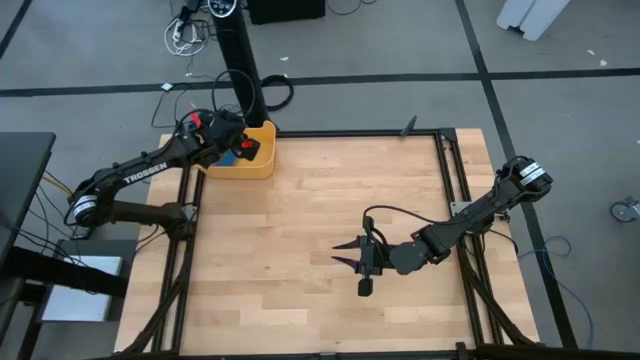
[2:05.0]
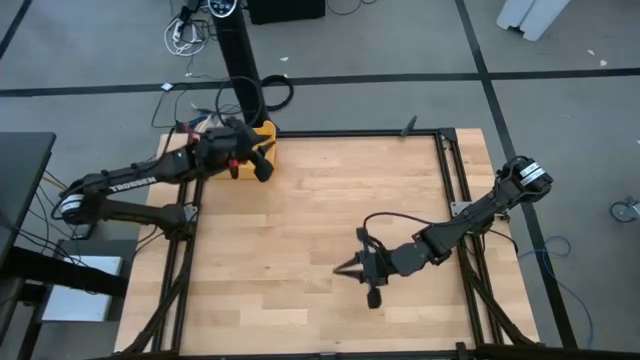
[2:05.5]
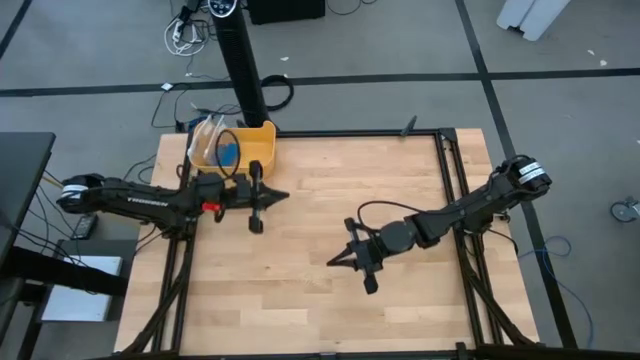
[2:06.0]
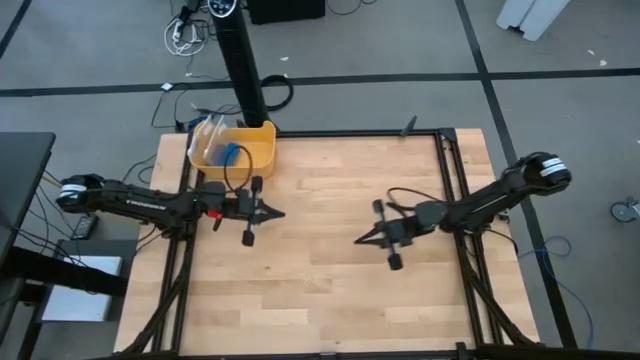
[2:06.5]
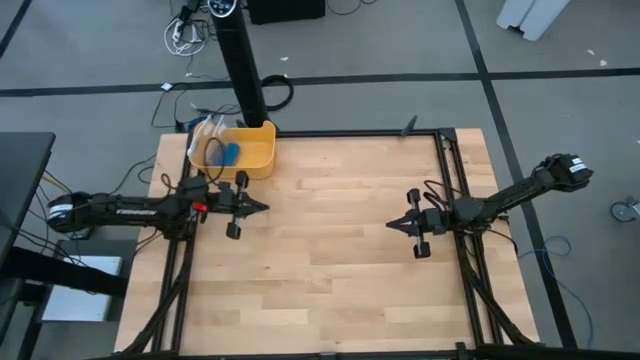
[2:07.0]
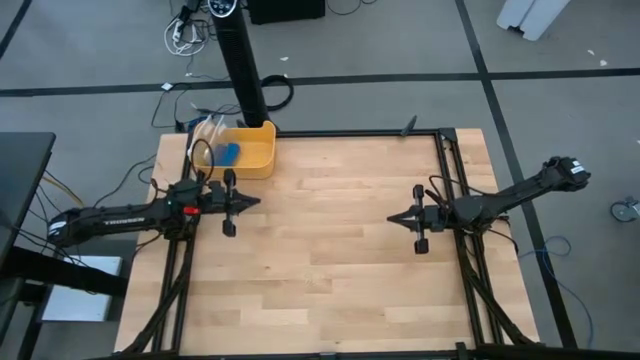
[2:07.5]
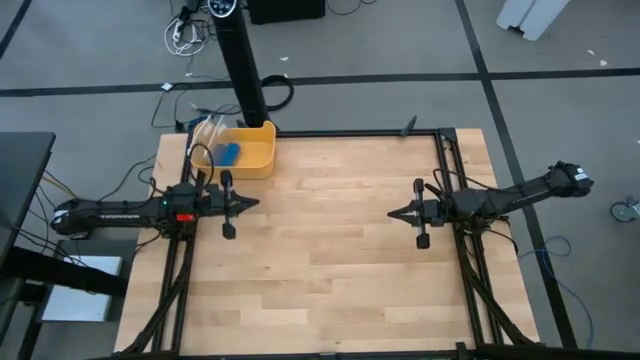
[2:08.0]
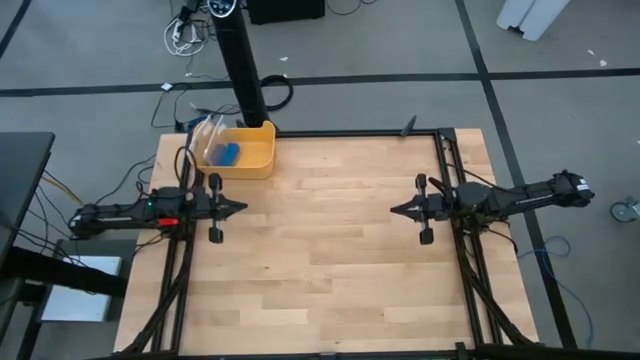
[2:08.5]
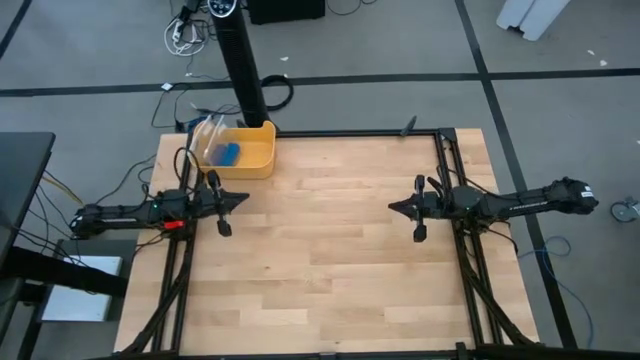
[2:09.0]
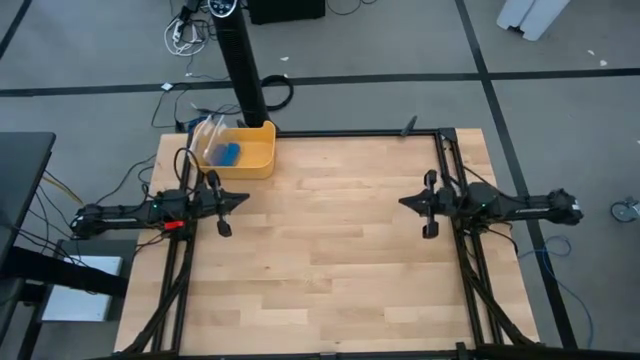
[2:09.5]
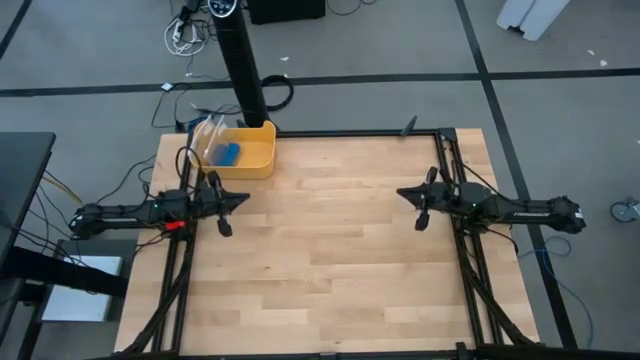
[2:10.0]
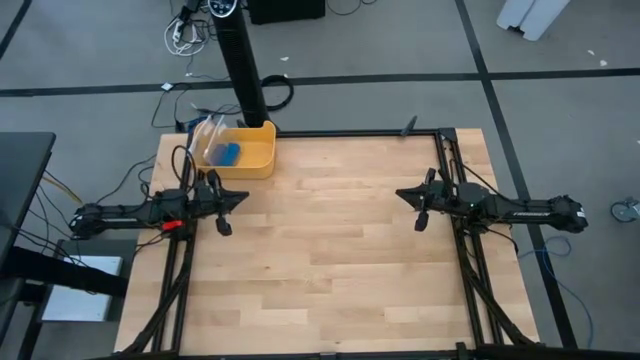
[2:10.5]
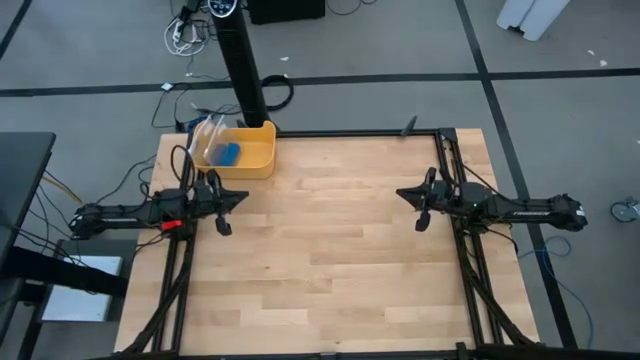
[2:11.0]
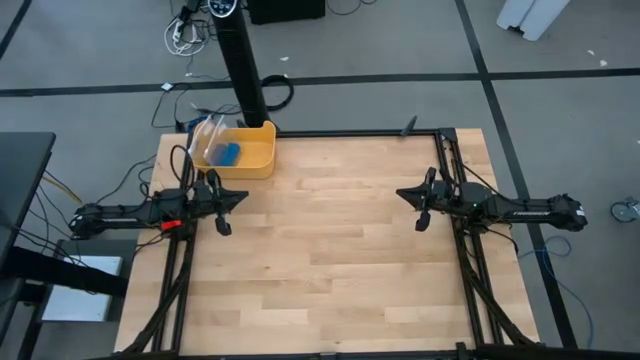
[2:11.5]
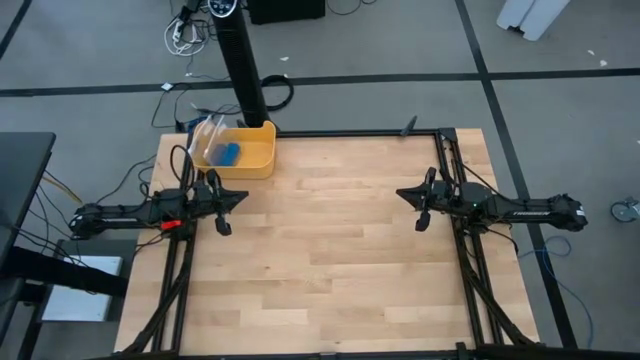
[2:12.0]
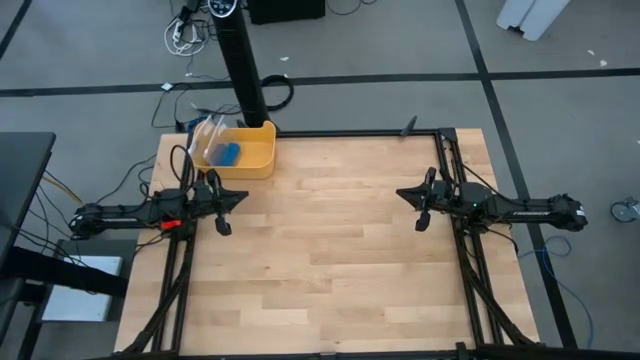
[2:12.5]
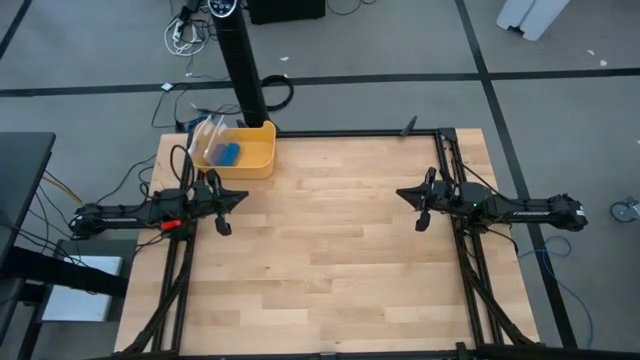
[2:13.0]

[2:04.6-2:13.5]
Task: Roll bandage
Return to Home Position

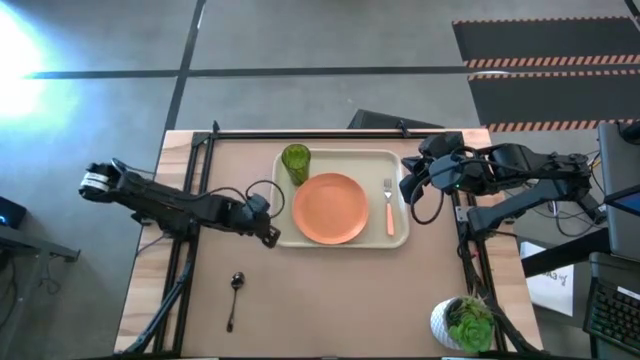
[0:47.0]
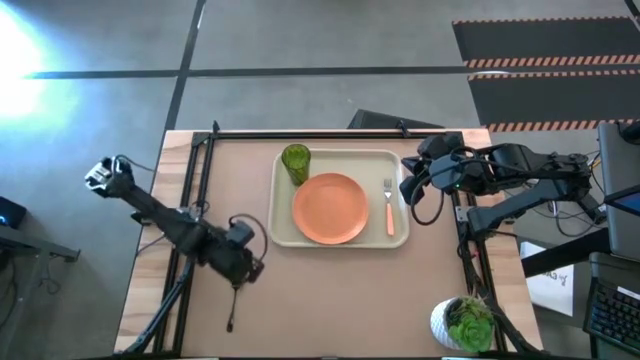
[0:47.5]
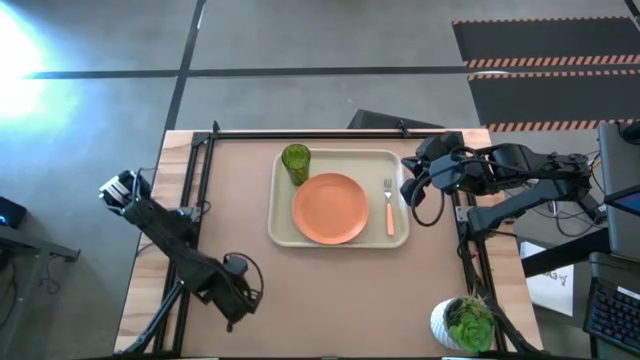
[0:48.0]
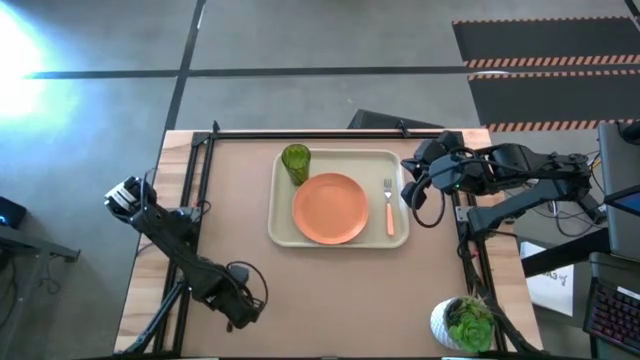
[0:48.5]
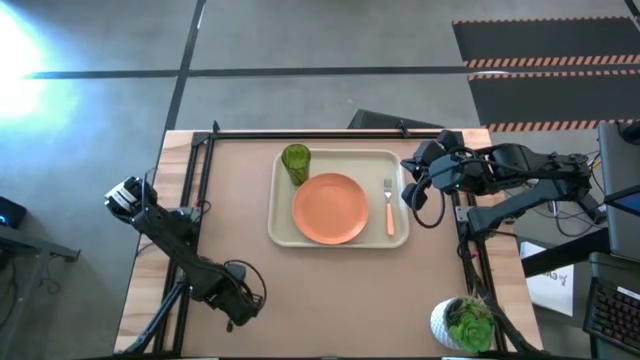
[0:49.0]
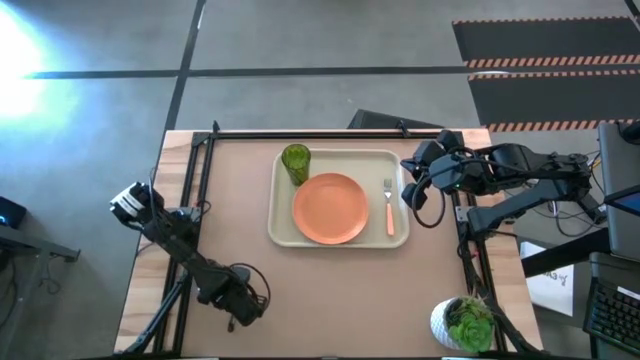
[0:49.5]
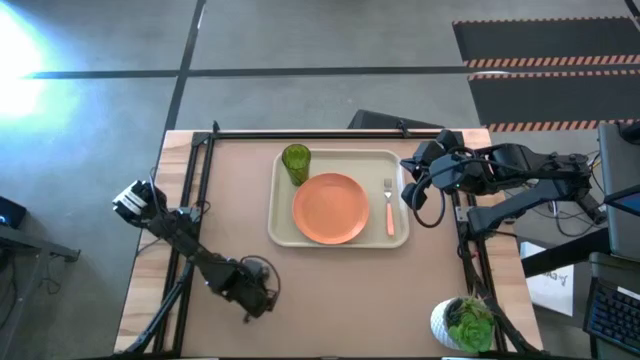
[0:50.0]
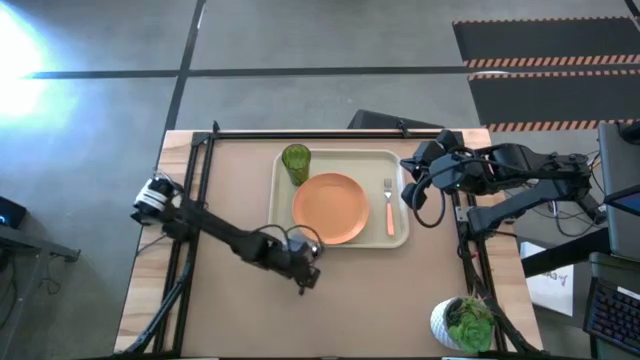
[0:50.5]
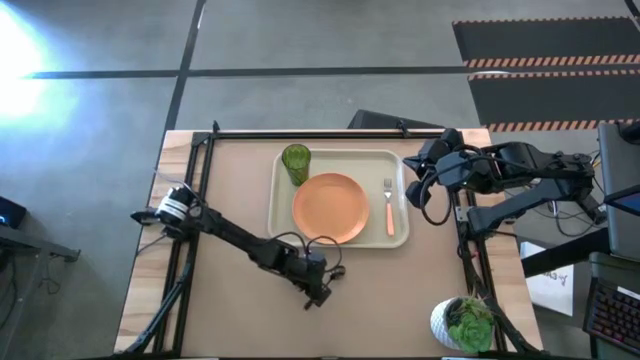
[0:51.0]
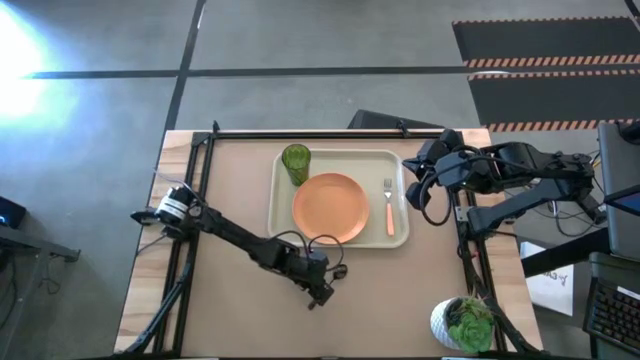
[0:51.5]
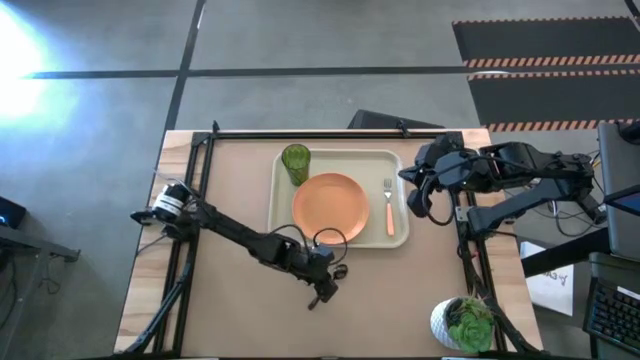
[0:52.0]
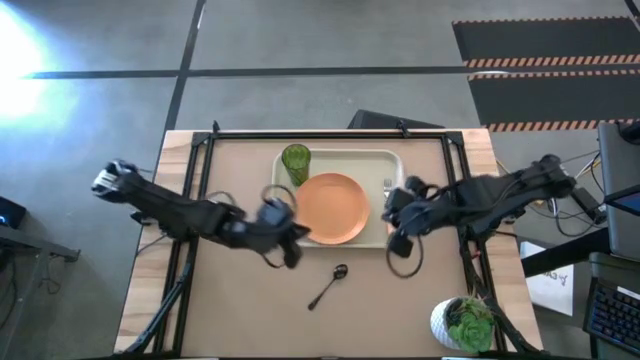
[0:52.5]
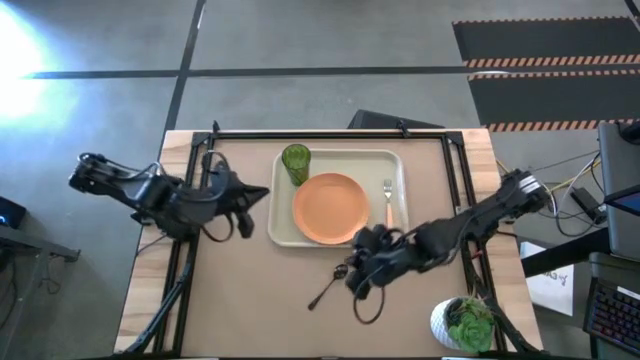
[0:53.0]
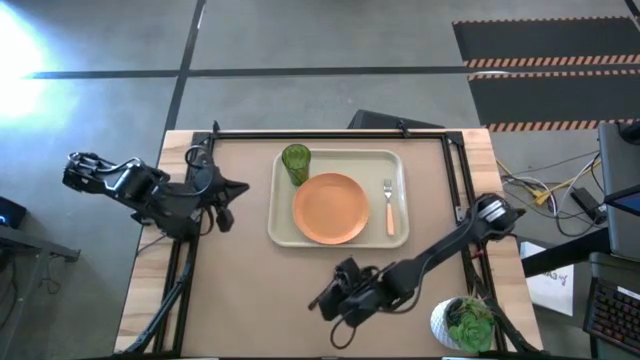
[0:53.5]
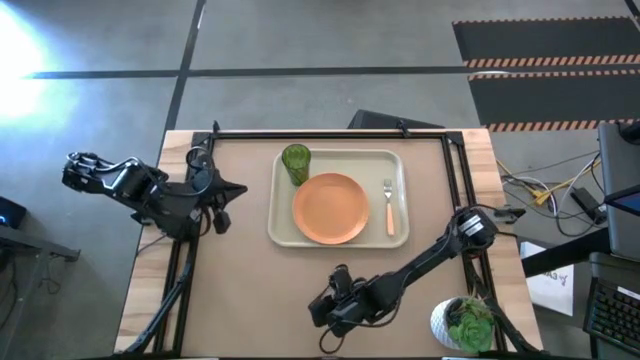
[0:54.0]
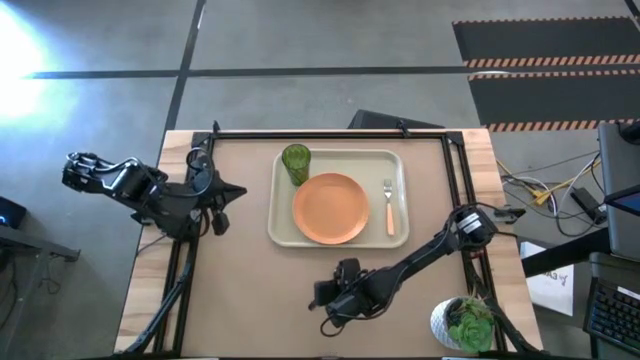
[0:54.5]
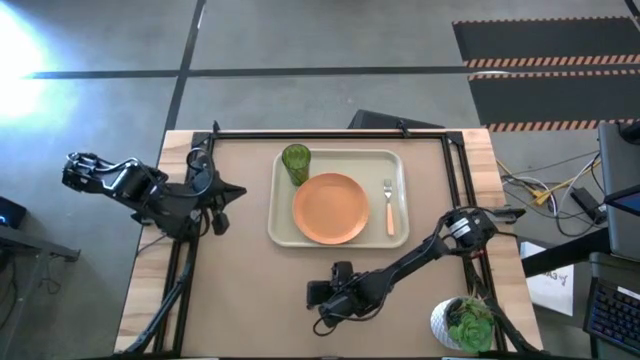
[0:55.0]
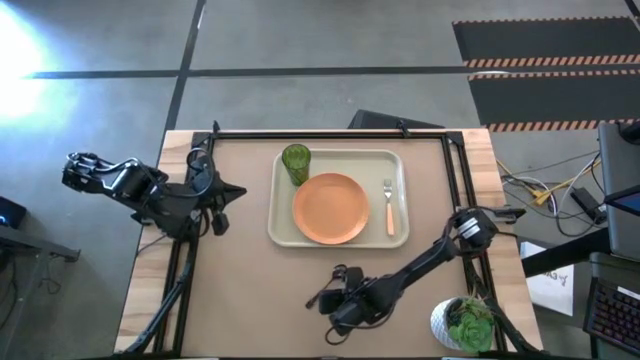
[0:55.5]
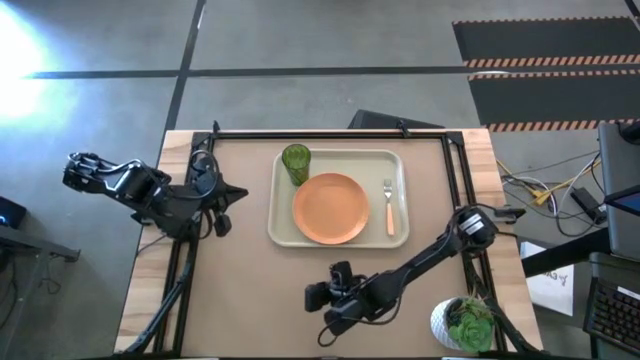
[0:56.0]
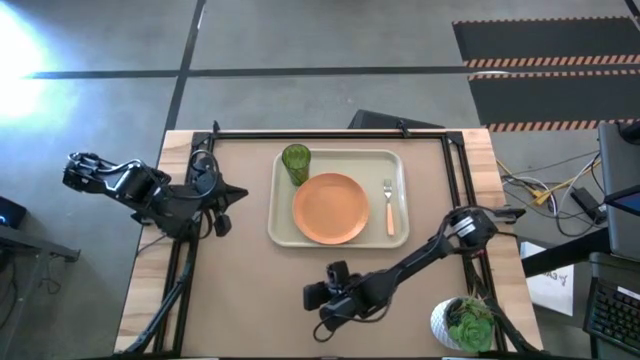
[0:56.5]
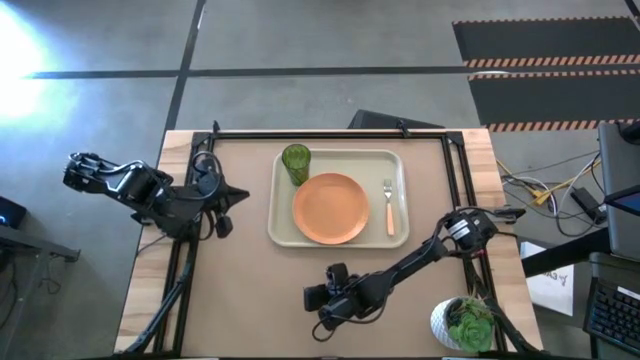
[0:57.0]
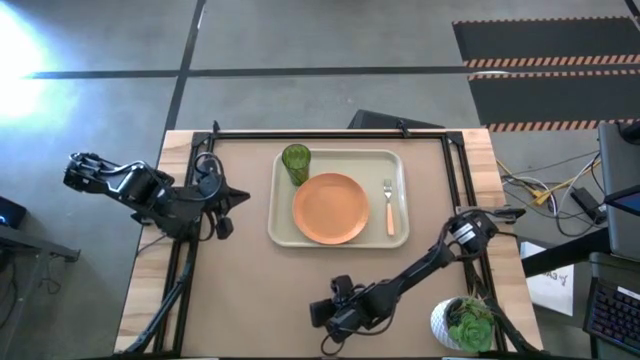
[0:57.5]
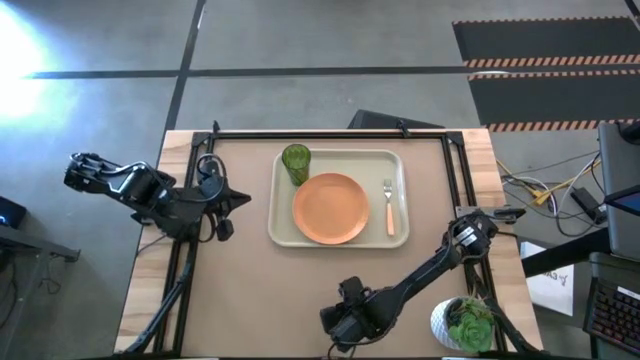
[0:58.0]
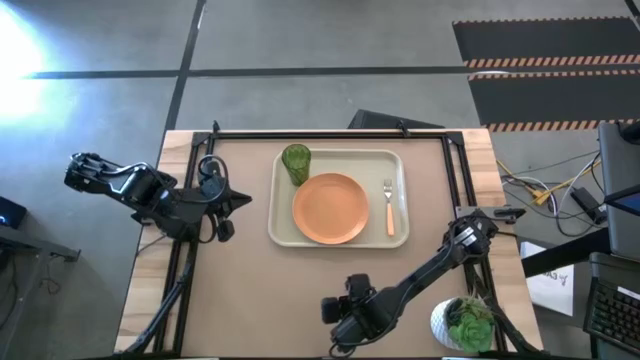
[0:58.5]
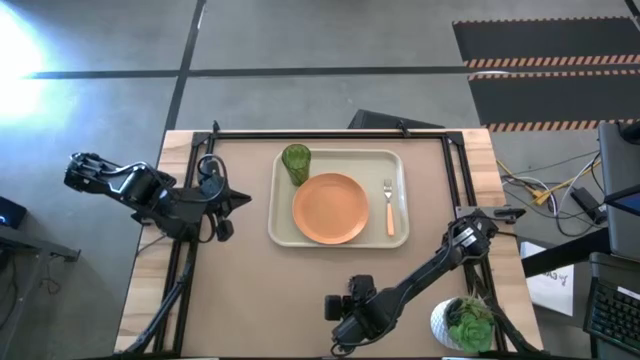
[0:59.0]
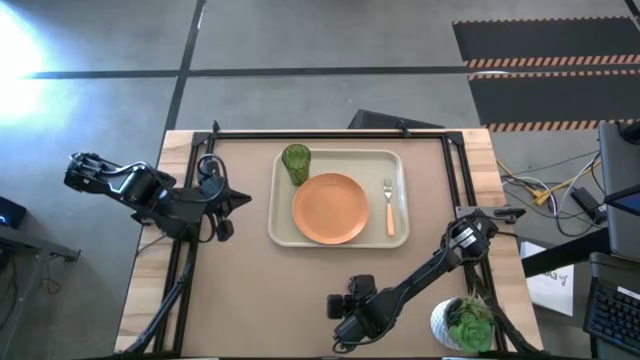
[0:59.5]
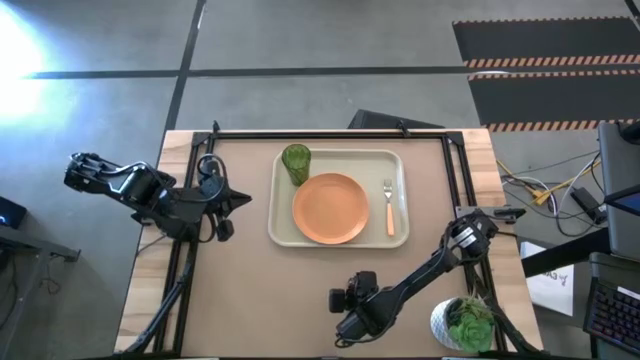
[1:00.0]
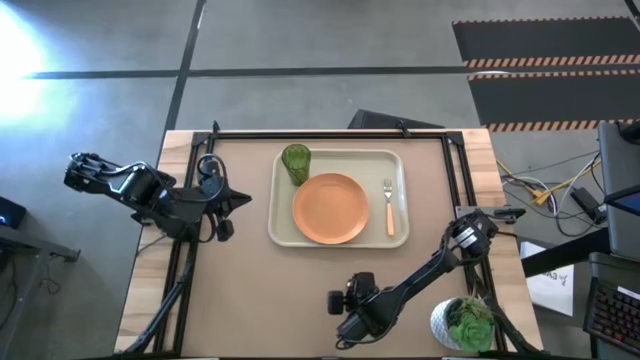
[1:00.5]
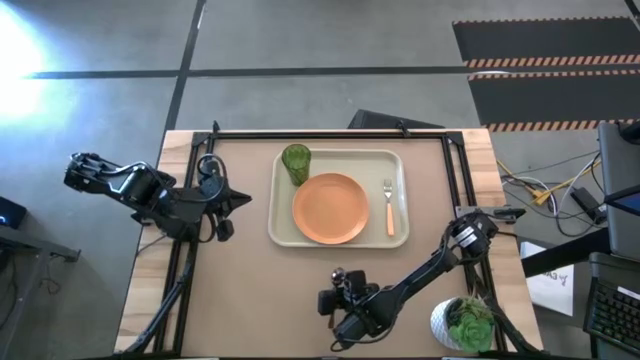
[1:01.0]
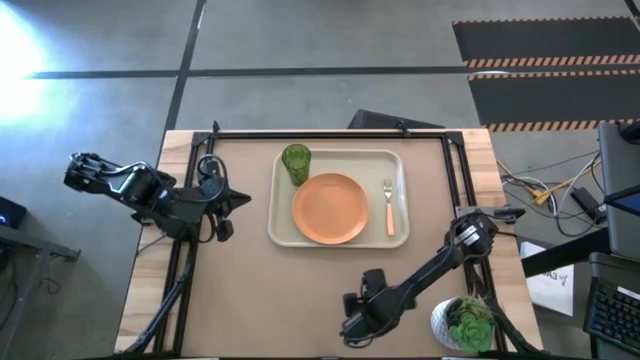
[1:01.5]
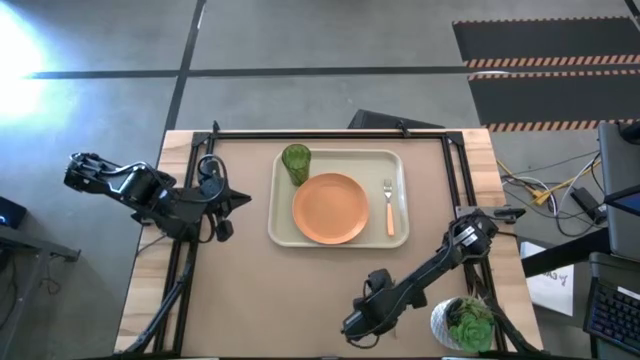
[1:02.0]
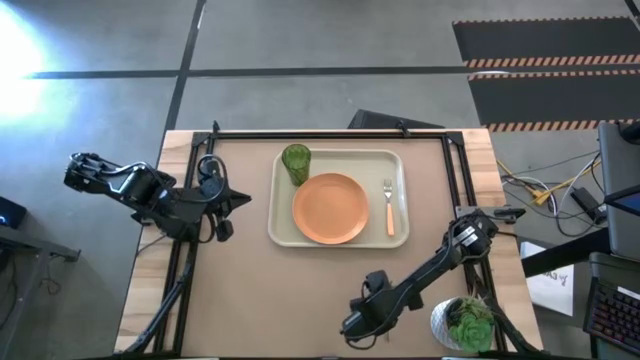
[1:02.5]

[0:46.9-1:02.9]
Task: Pick and place plate/cup/fork/spoon on tray
Put the black spoon on the light brown serving tray to the right of the orange plate
